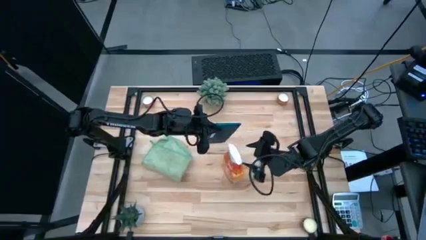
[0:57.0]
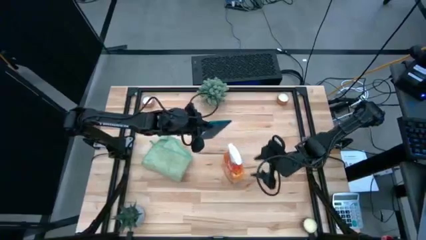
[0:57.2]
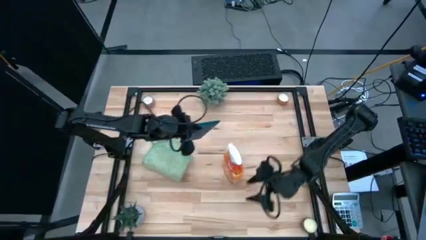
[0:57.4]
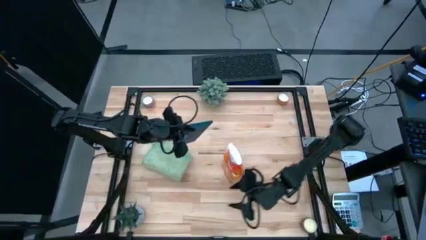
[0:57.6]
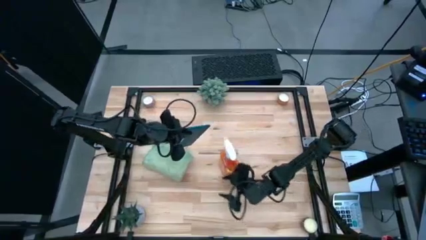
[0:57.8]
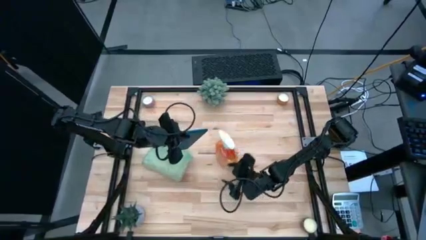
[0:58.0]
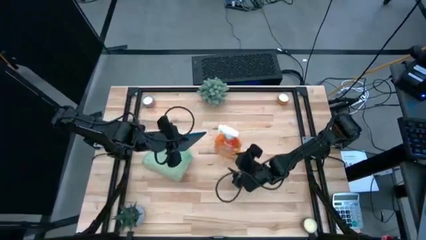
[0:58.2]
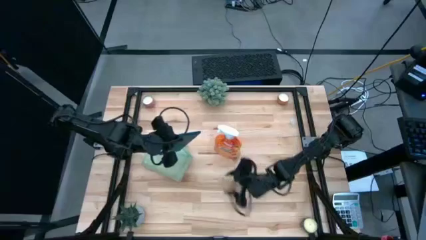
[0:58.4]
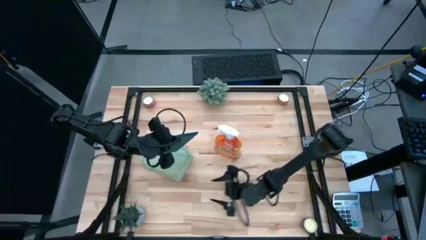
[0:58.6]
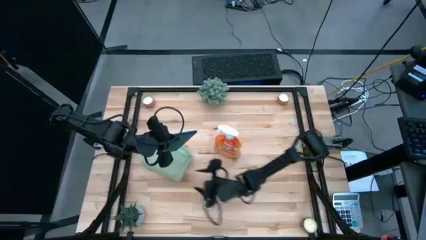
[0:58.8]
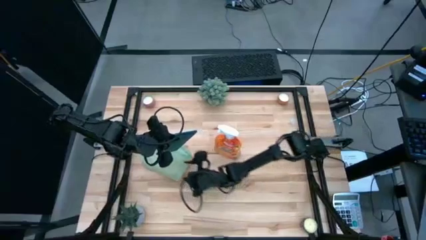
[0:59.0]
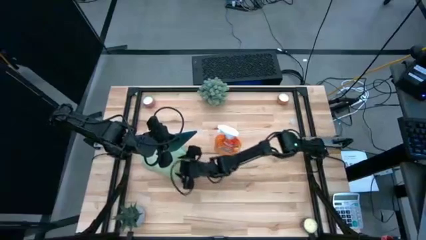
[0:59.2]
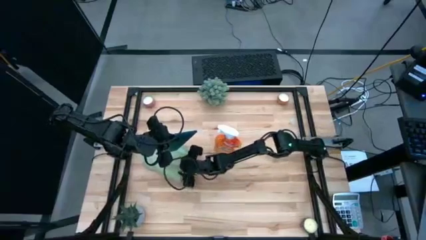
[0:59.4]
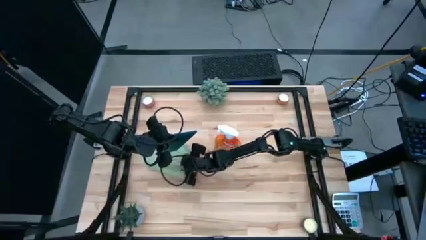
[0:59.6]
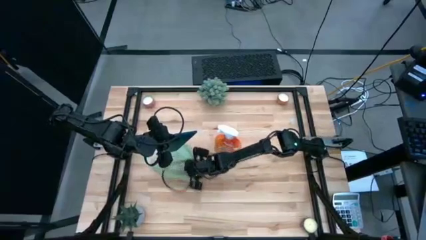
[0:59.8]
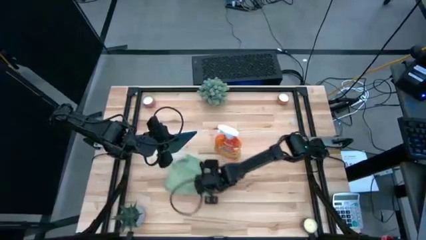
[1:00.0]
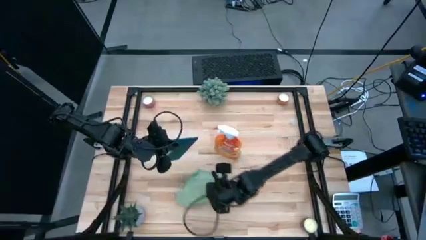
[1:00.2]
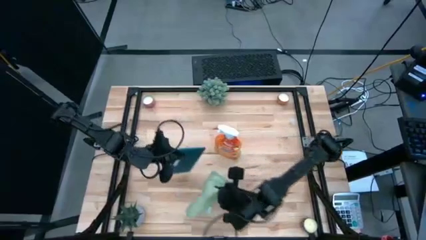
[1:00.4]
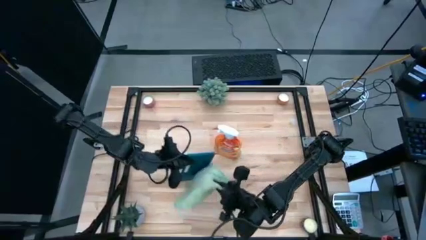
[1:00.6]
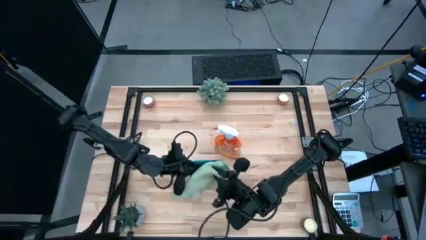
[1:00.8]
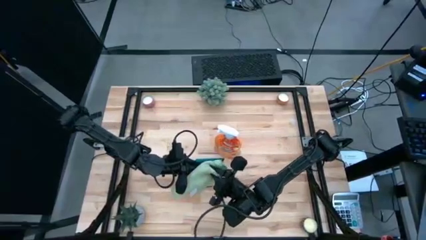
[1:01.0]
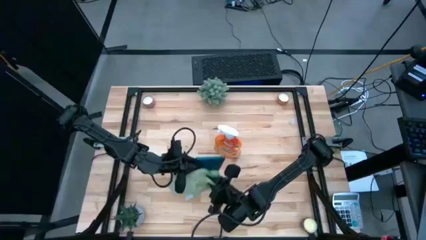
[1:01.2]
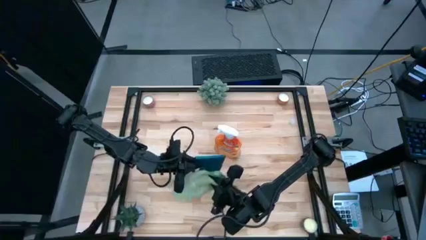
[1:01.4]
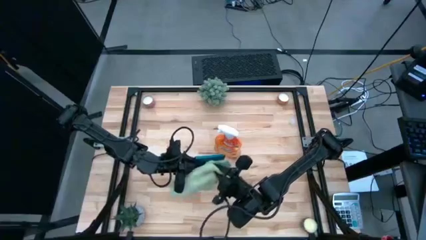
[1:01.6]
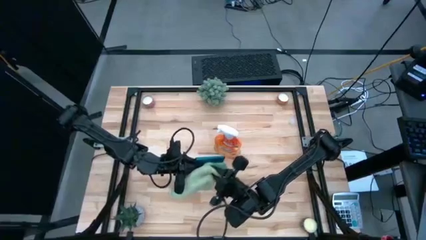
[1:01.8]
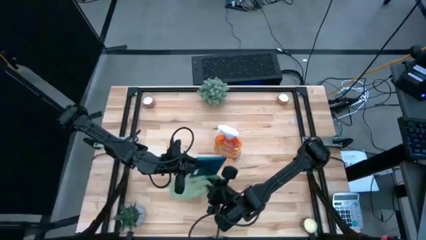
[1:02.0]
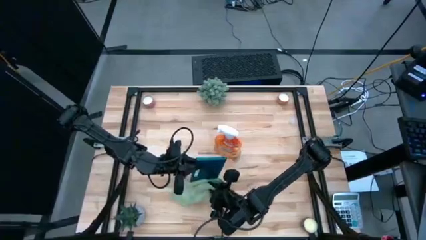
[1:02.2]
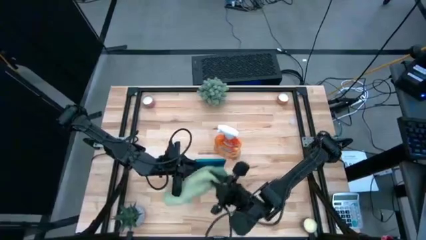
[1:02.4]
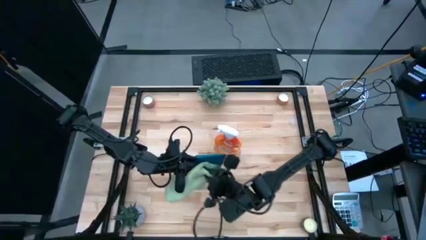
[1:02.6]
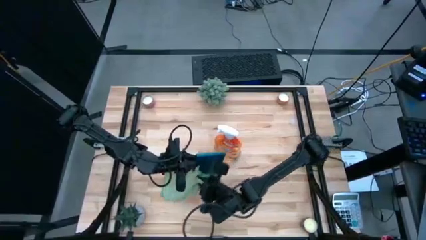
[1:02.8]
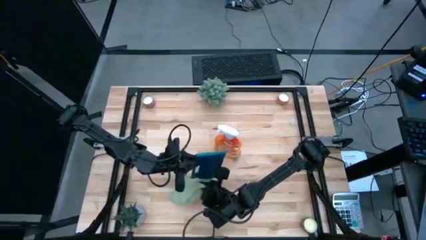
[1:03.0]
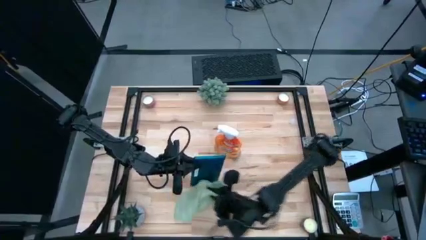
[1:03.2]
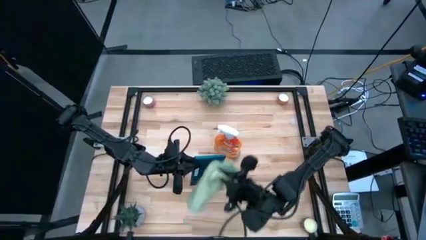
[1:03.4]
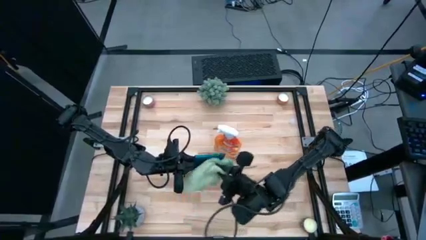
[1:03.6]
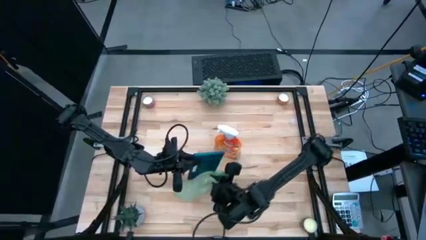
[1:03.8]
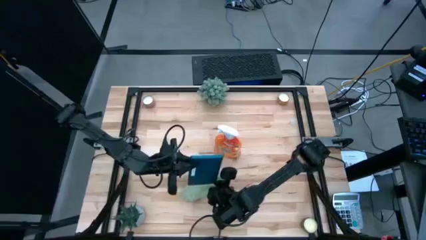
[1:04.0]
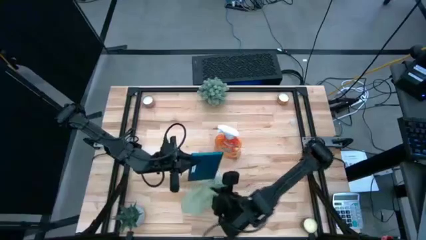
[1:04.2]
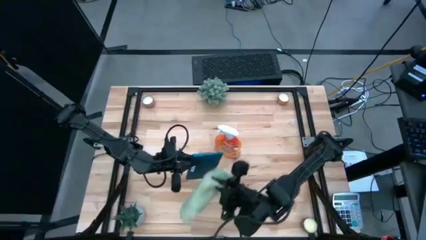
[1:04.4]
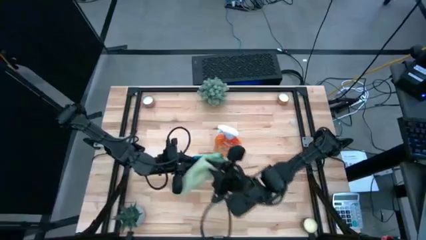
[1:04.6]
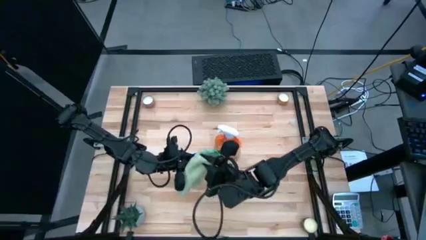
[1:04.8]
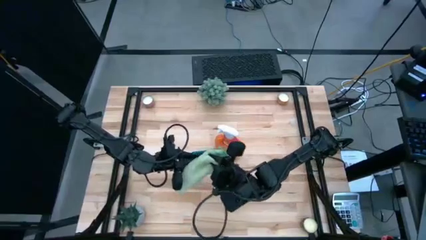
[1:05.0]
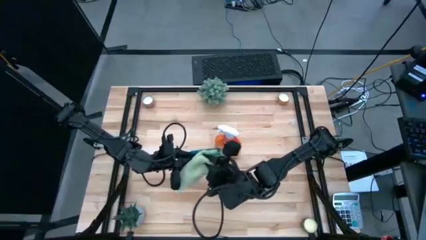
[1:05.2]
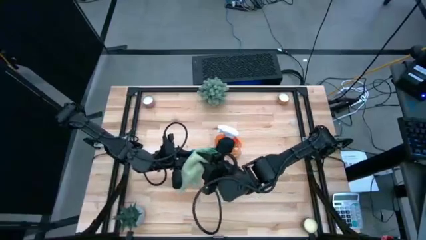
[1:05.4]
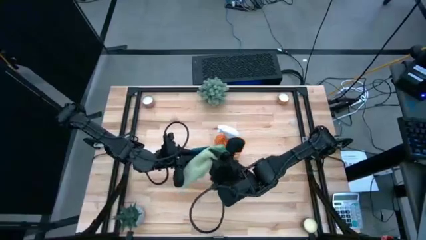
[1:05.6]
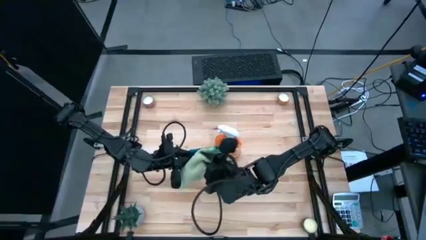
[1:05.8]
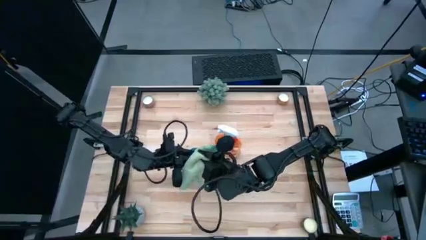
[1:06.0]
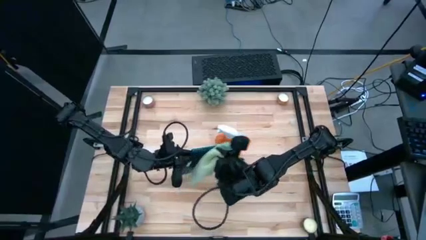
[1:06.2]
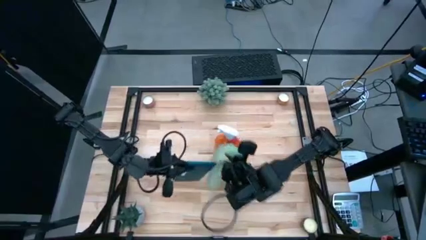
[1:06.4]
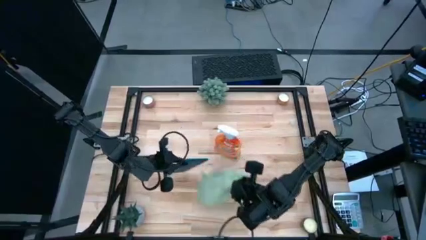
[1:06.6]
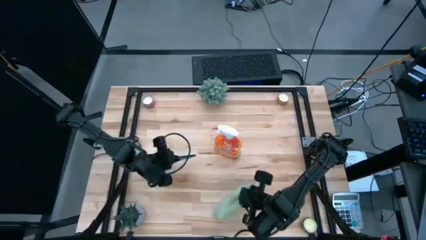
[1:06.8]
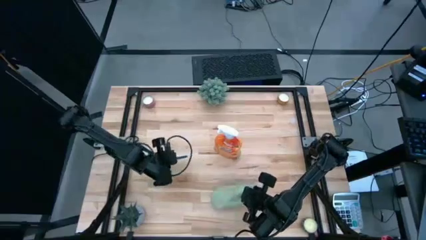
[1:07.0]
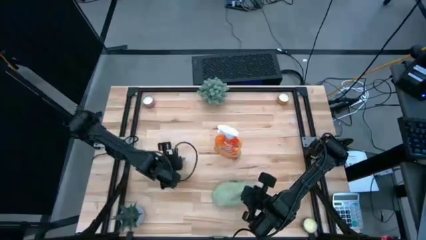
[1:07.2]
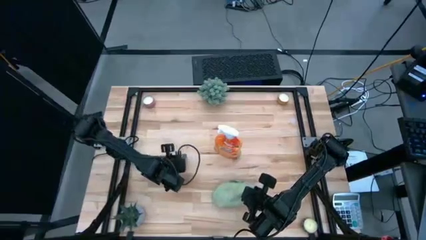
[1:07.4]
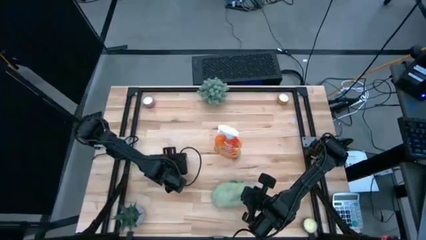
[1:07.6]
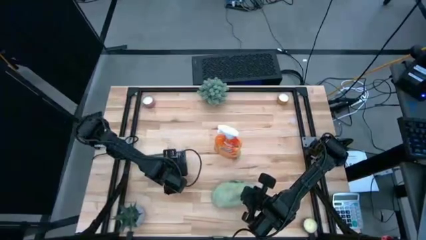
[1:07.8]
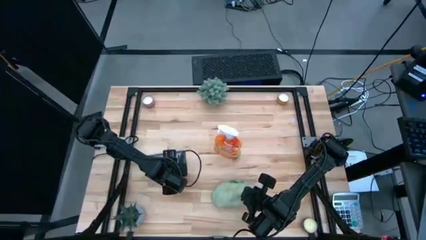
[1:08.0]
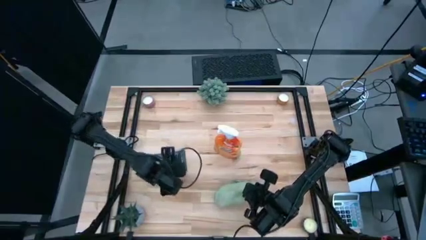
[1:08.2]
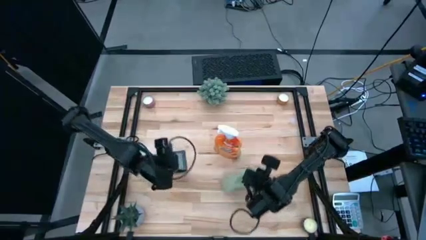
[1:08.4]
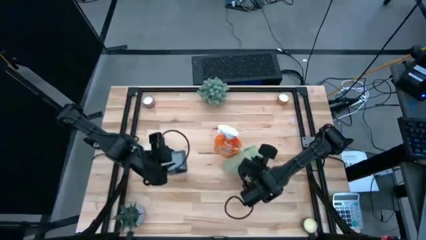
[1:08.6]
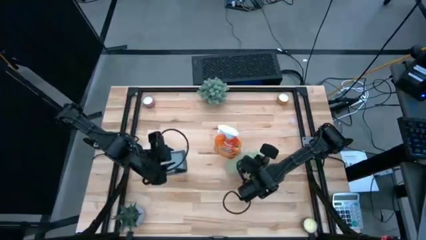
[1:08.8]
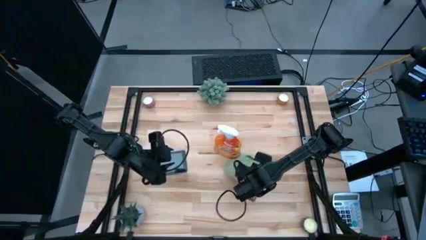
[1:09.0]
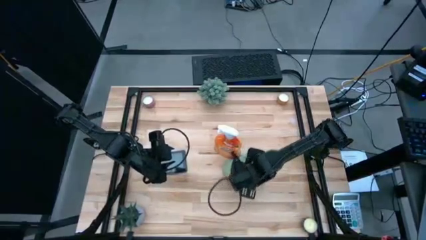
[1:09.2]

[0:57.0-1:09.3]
Task: Apply microfiber cloth
Wipe the back of the blue tablet with the green microfiber cloth
